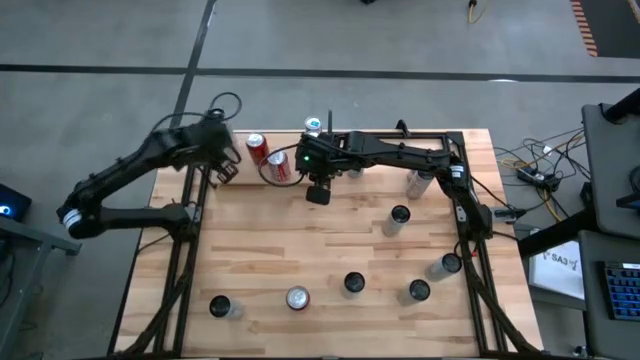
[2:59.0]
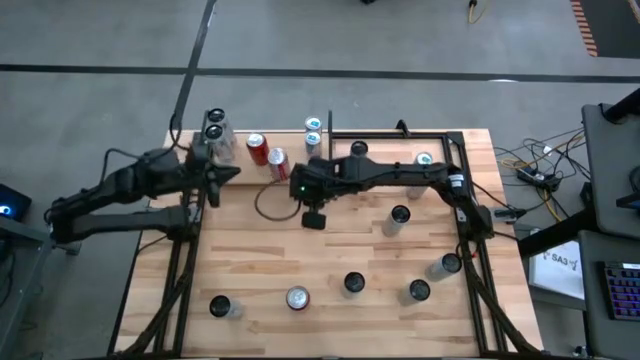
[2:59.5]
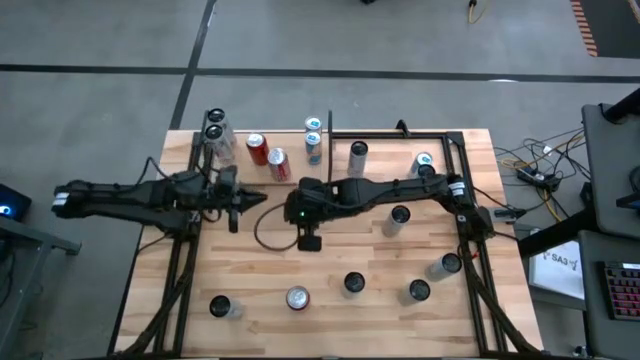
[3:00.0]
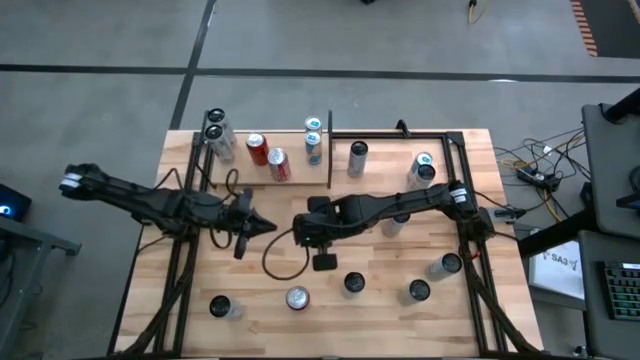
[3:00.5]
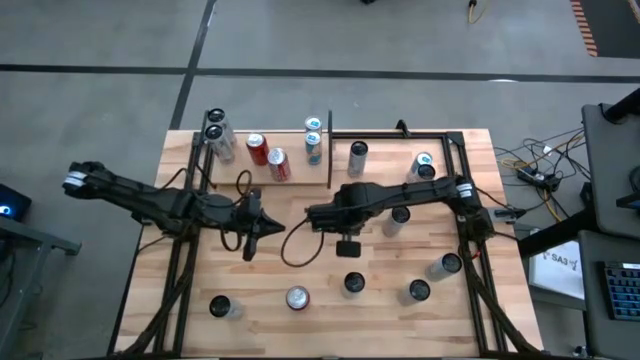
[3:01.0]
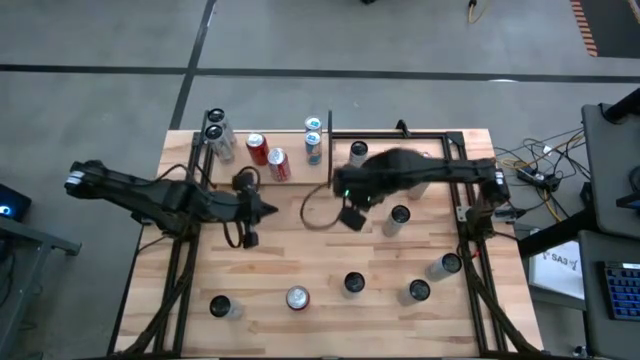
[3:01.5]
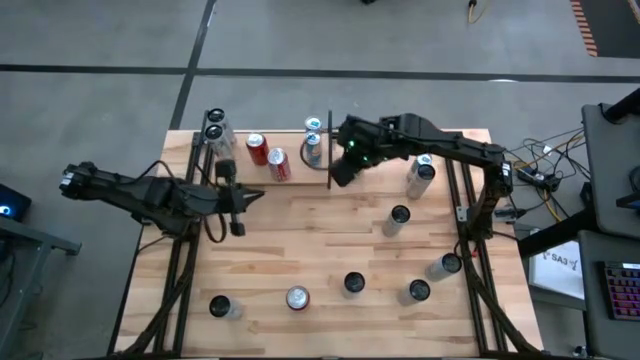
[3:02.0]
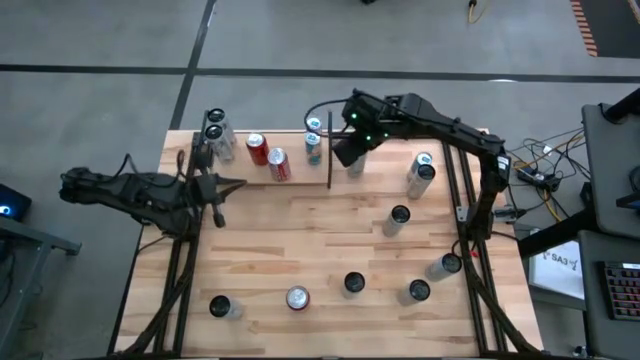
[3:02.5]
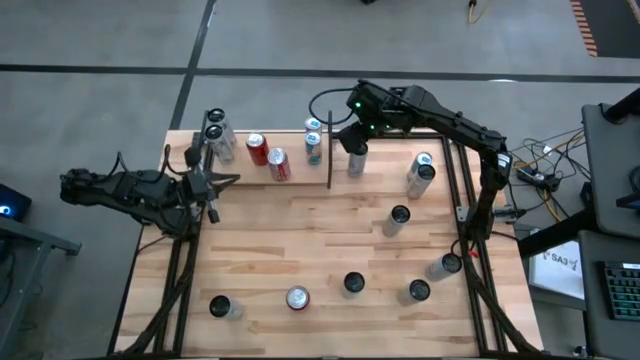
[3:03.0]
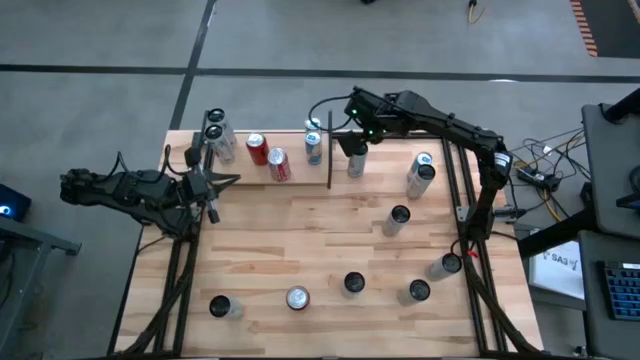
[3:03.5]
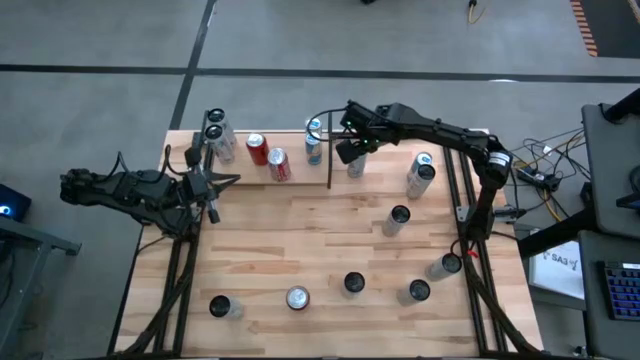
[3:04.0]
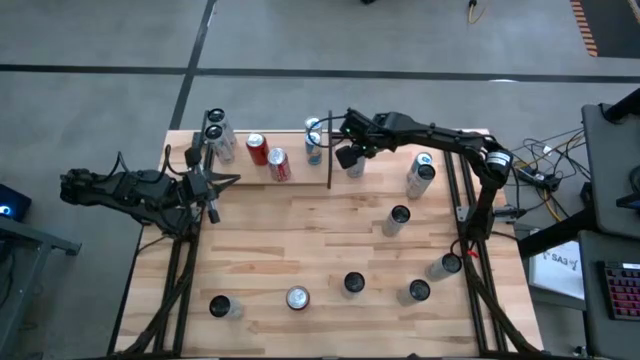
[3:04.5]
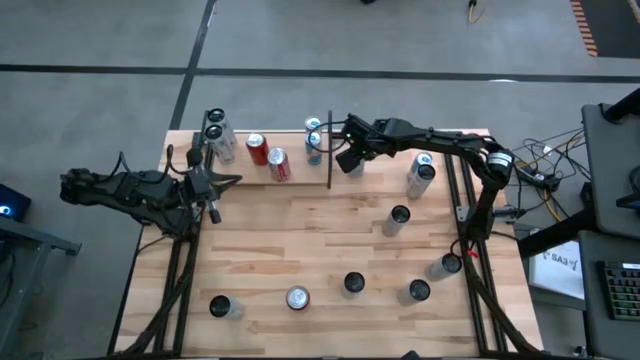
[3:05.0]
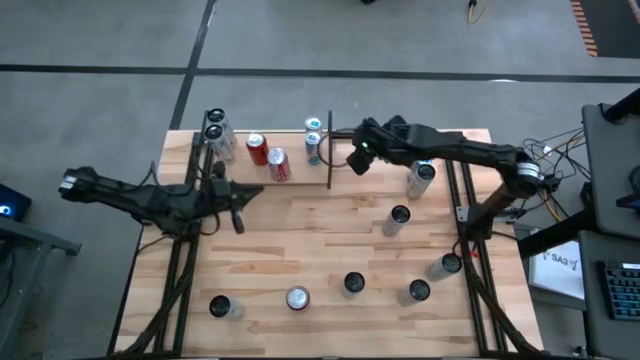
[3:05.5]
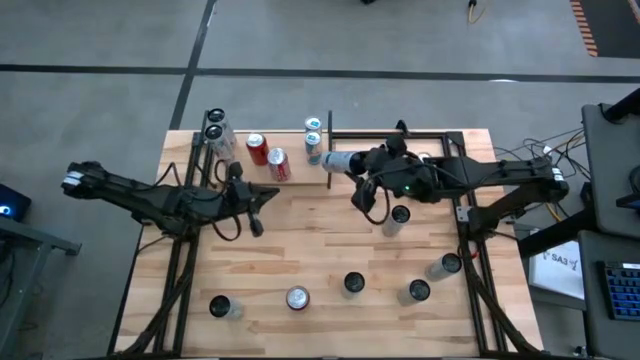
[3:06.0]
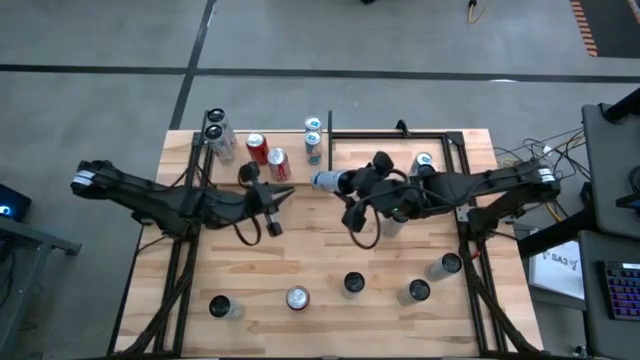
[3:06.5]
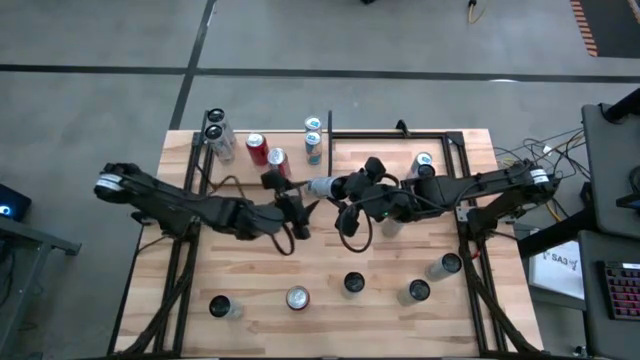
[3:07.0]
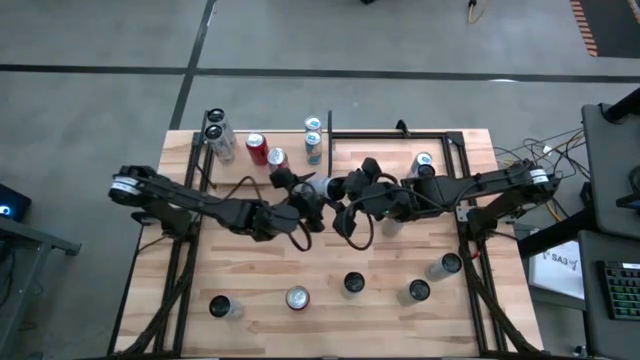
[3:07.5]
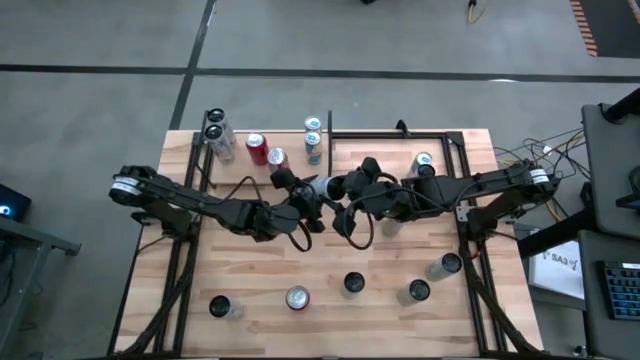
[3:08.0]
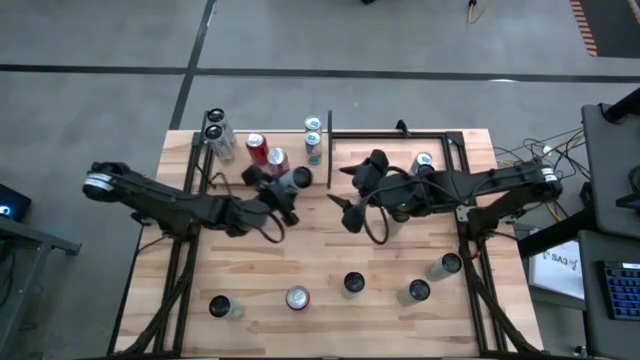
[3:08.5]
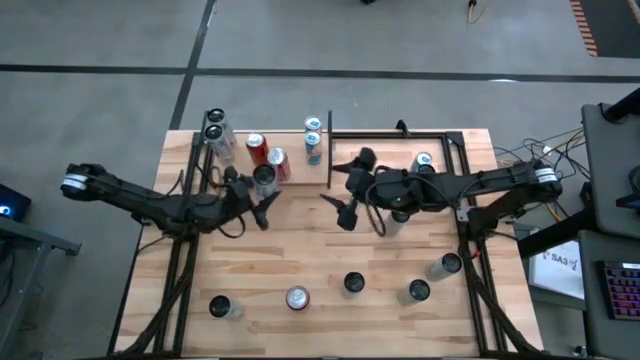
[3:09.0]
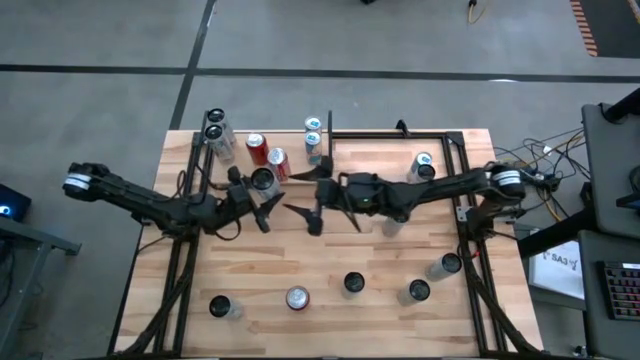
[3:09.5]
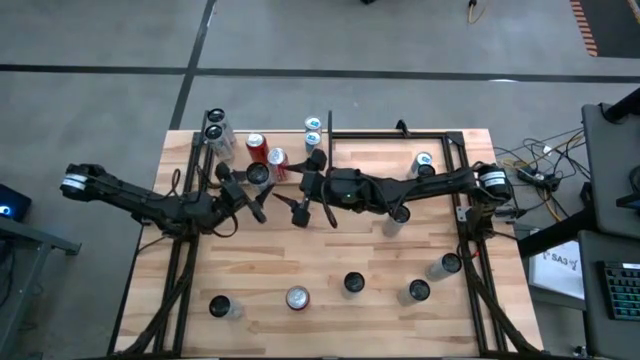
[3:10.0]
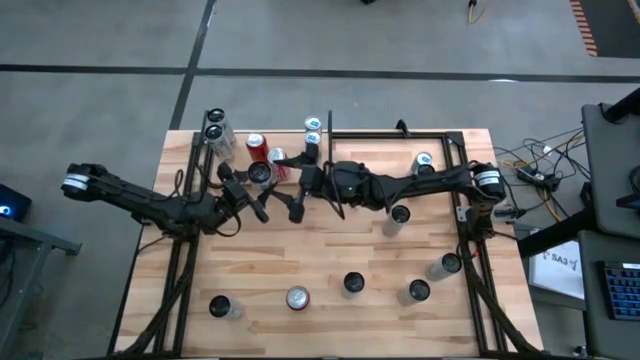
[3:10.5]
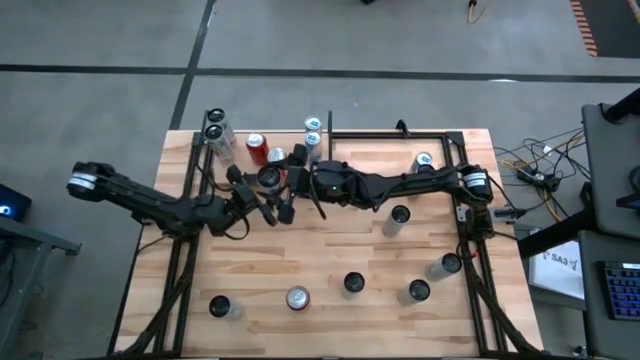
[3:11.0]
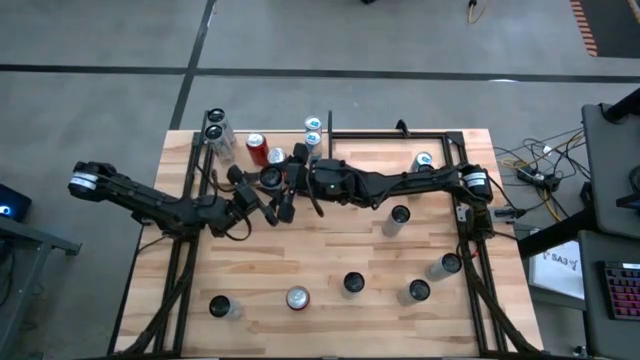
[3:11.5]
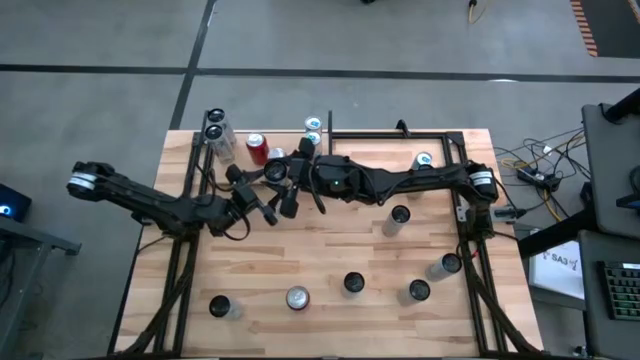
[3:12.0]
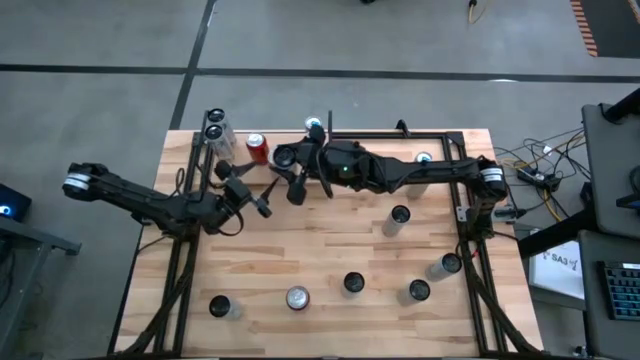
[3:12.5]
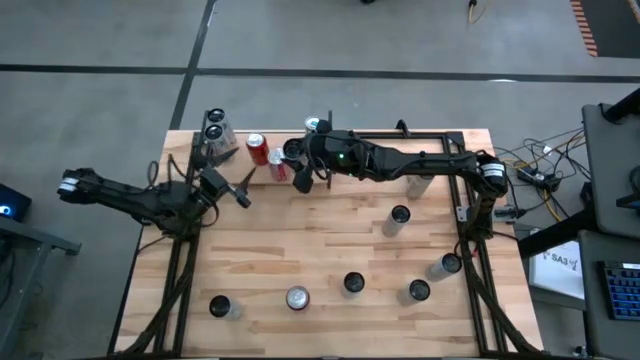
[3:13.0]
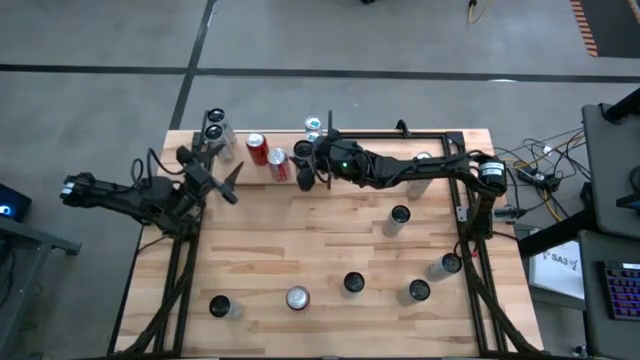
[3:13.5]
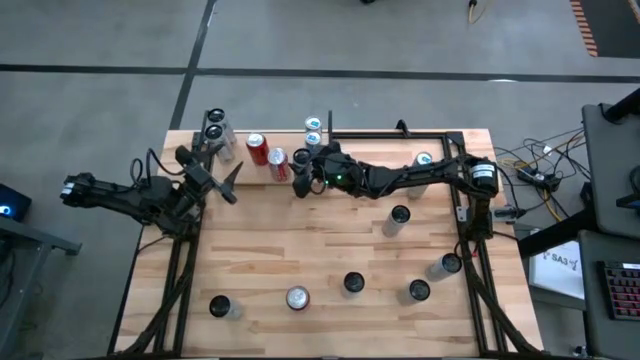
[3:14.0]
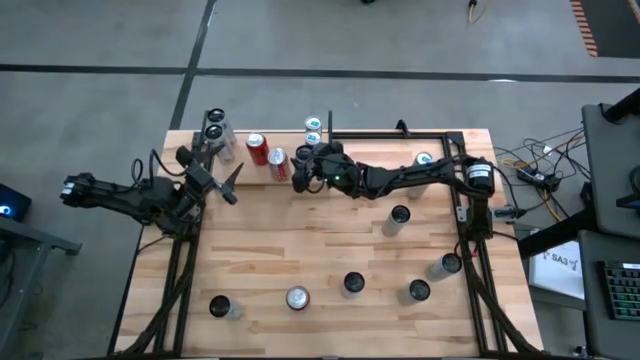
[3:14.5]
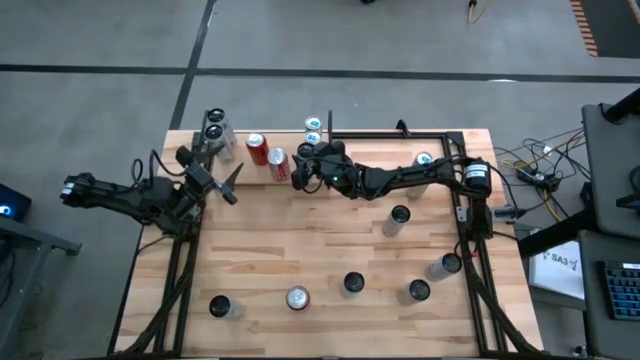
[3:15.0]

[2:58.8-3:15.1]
Task: Place canned beverage on shelf
Put the top left white and blue soda can on the shelf

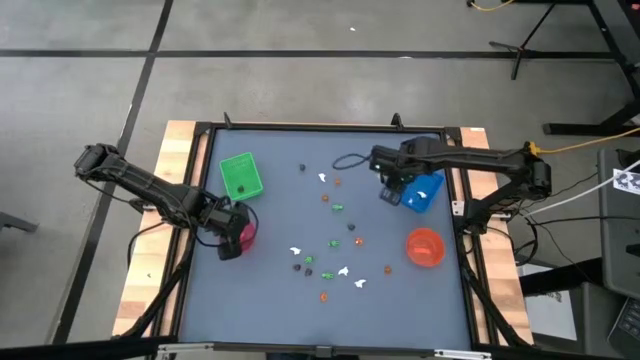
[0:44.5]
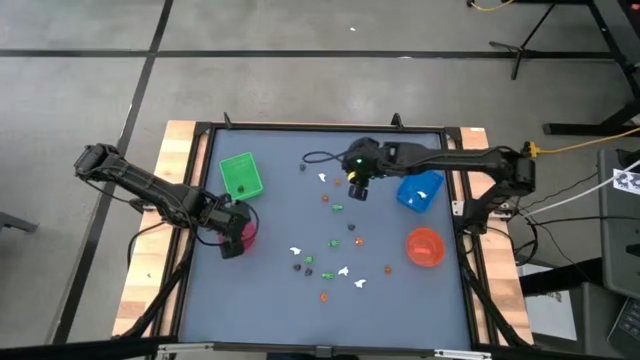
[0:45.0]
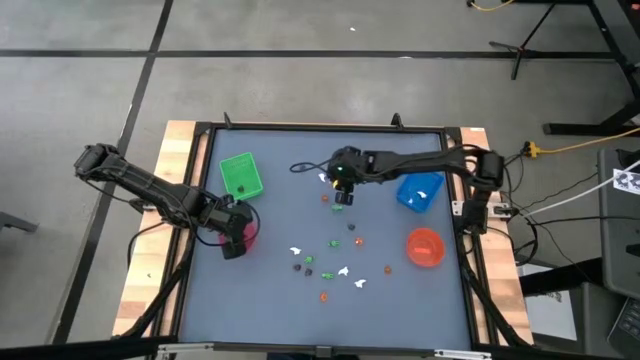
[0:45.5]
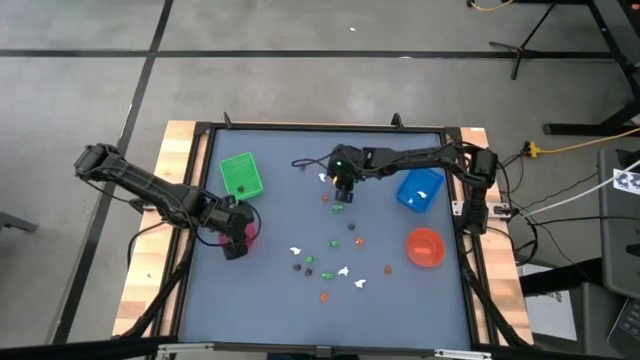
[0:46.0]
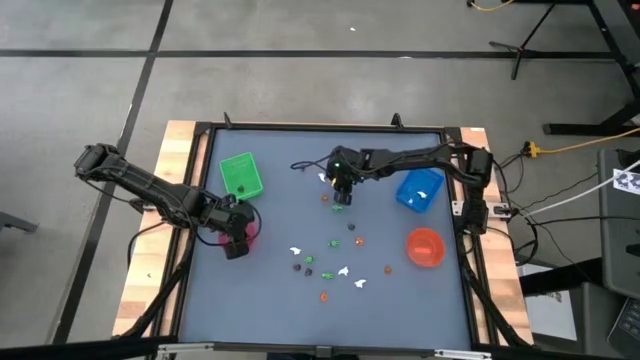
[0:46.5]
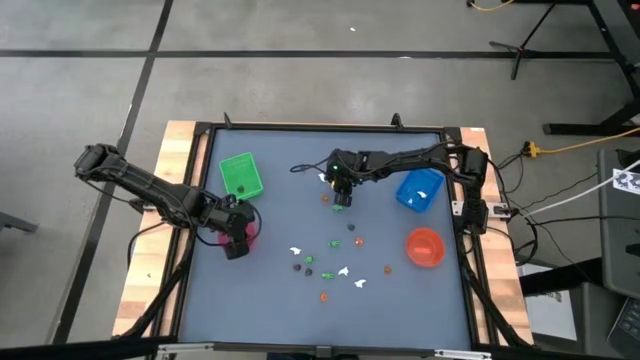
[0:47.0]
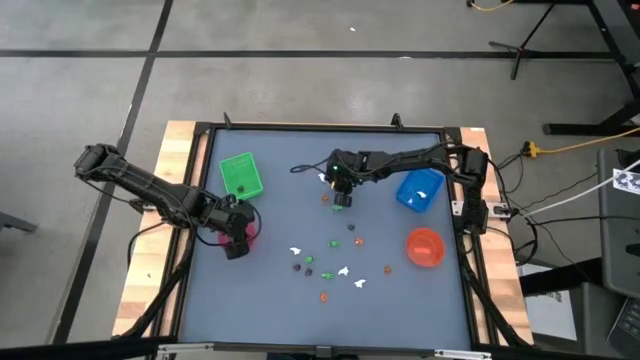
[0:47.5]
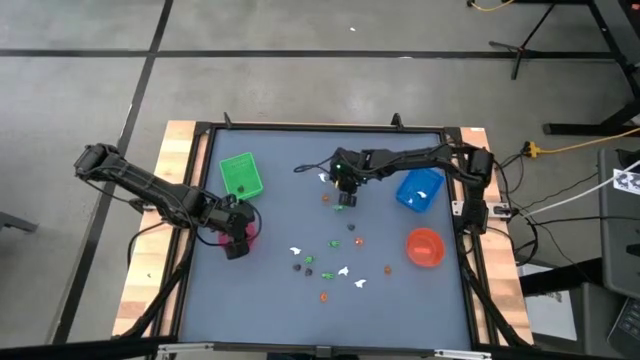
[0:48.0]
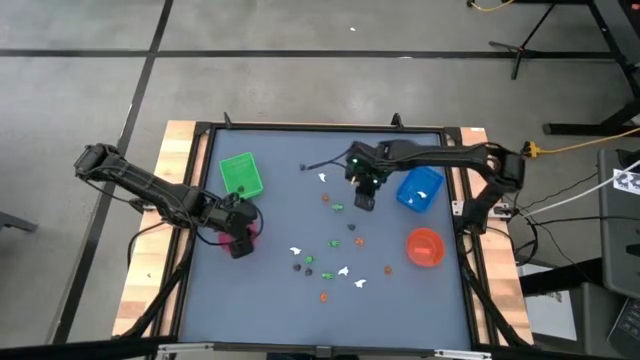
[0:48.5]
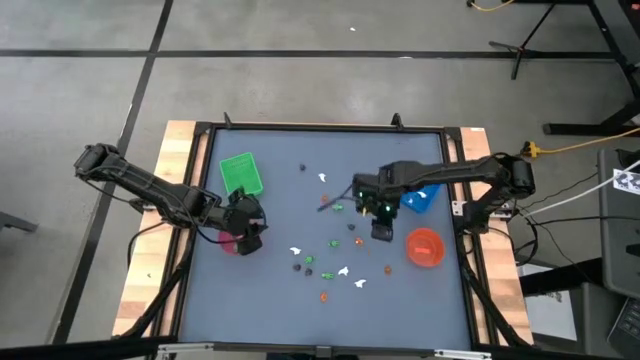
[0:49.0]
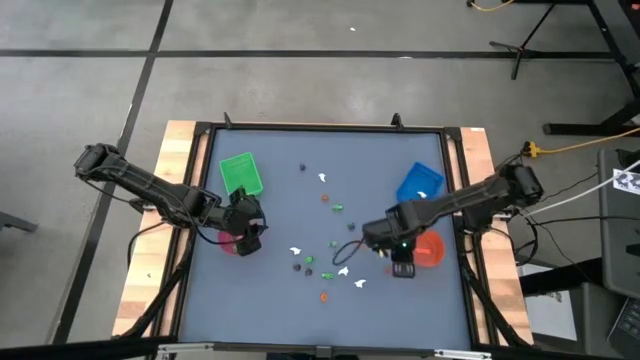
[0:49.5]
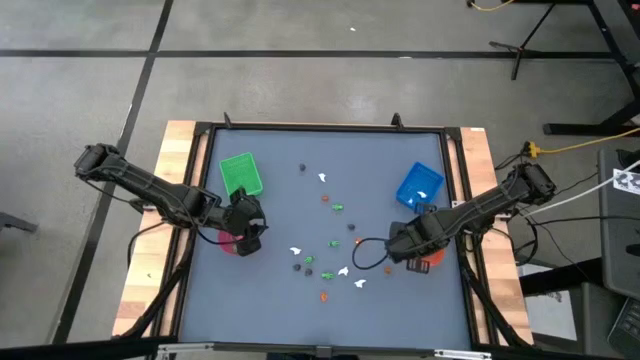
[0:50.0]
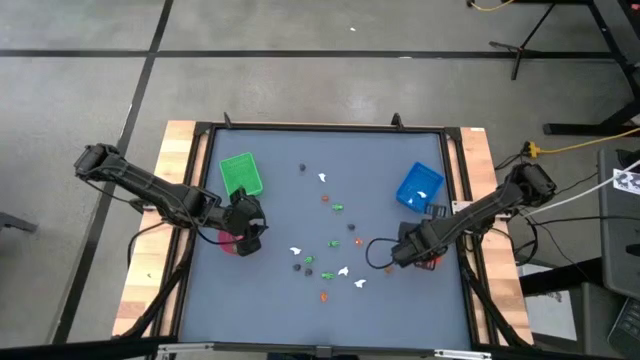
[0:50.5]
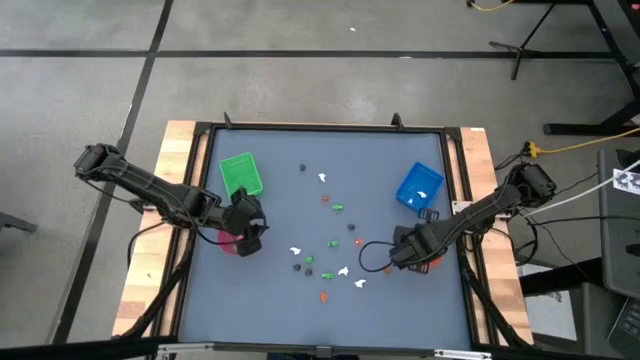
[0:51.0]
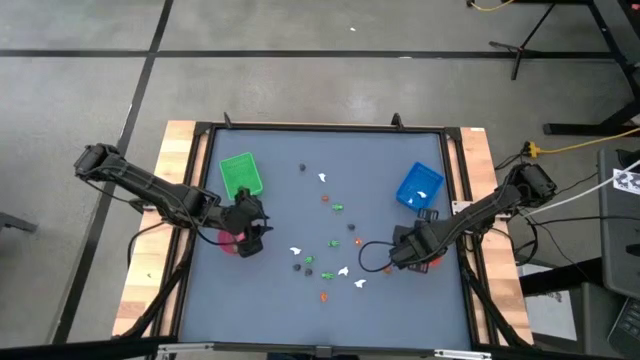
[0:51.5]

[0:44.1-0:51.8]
Task: Sort Halloween decoration
Put the small orange pumpkin toy into the transparent orange bowl
